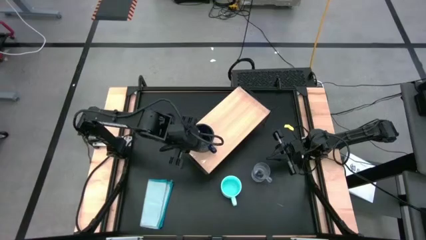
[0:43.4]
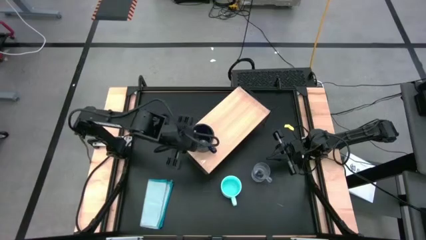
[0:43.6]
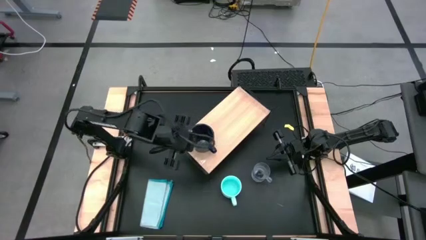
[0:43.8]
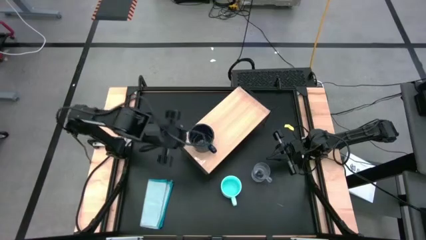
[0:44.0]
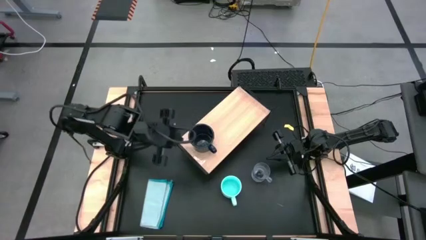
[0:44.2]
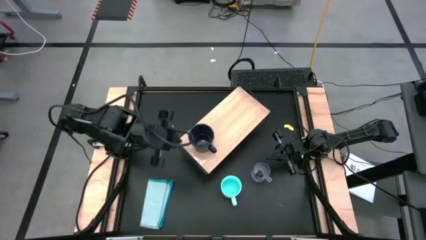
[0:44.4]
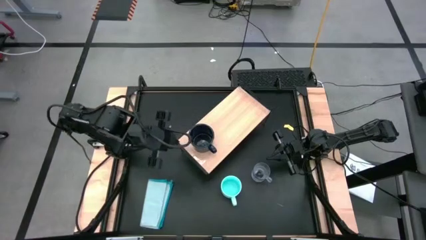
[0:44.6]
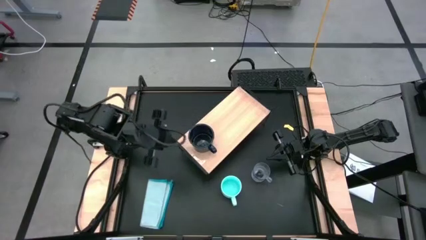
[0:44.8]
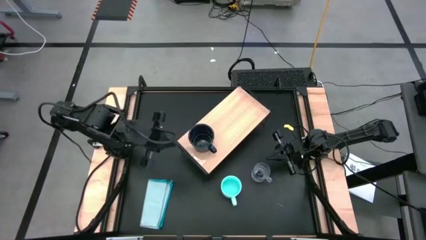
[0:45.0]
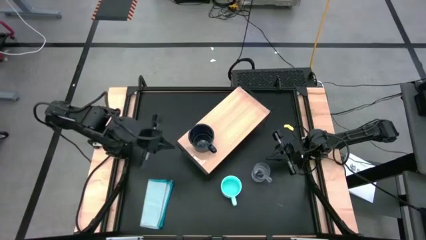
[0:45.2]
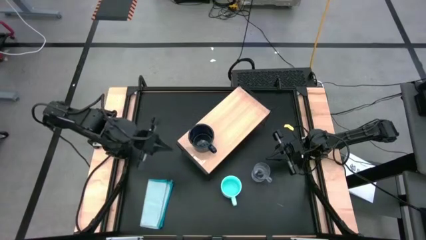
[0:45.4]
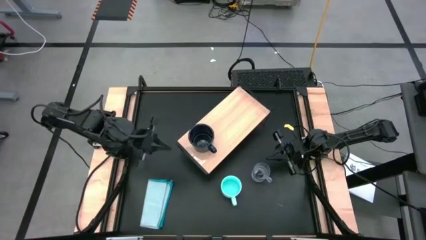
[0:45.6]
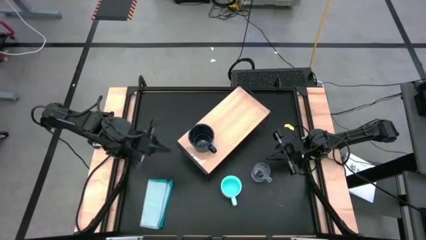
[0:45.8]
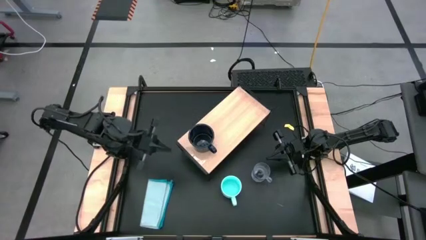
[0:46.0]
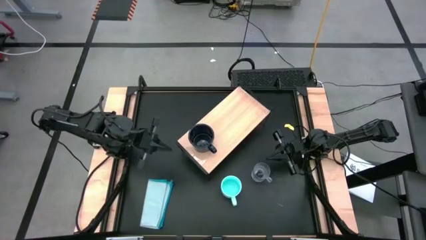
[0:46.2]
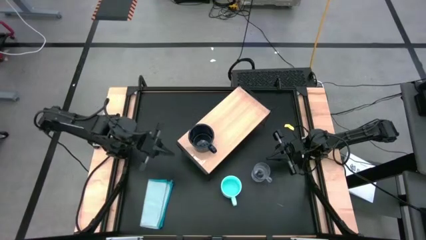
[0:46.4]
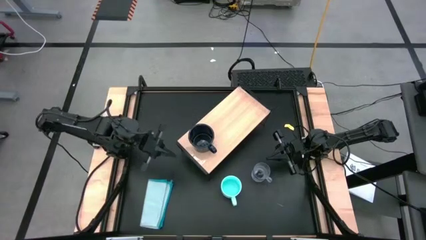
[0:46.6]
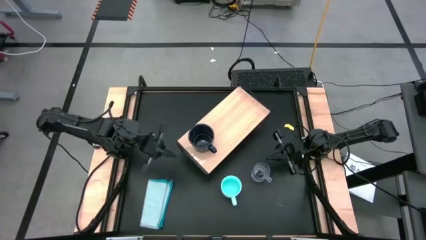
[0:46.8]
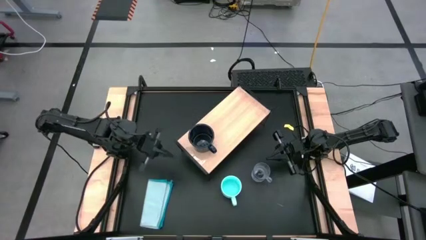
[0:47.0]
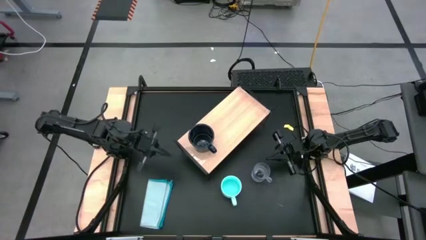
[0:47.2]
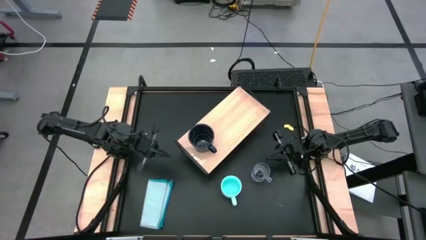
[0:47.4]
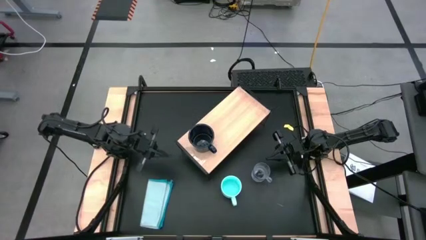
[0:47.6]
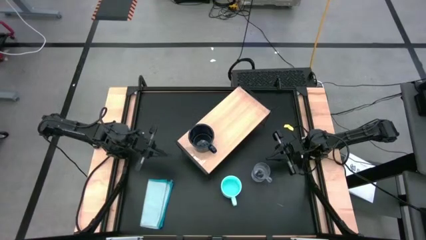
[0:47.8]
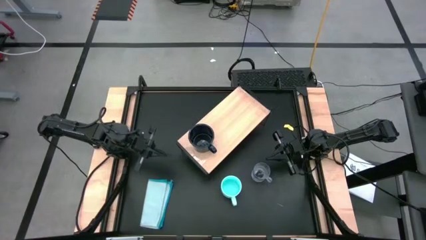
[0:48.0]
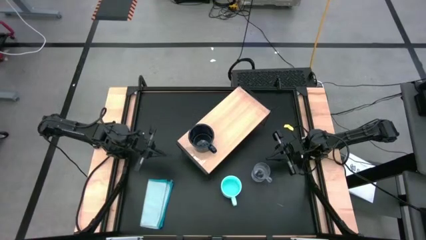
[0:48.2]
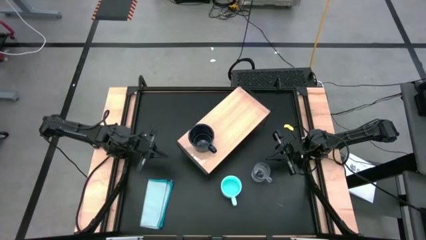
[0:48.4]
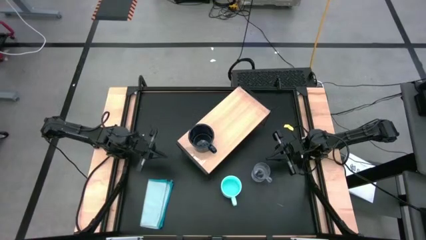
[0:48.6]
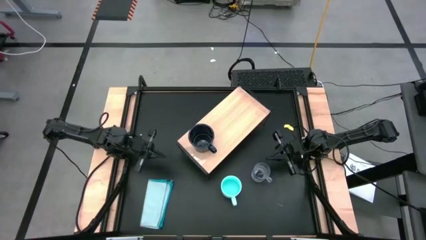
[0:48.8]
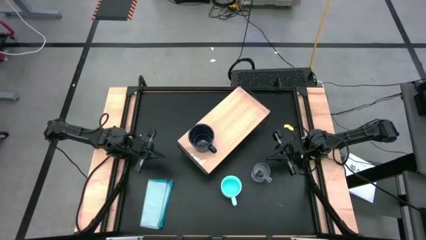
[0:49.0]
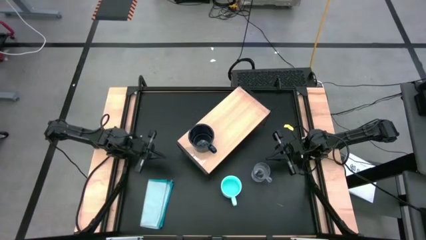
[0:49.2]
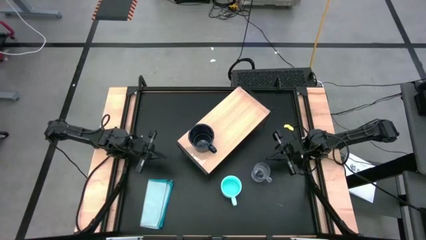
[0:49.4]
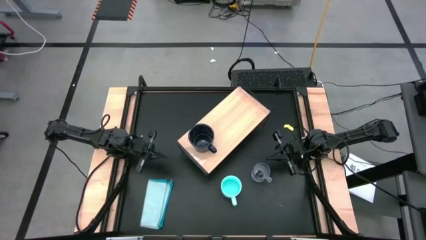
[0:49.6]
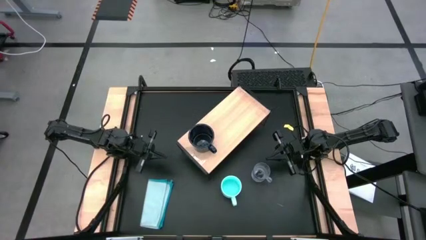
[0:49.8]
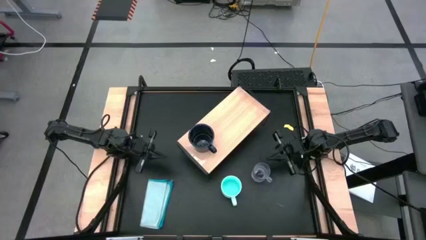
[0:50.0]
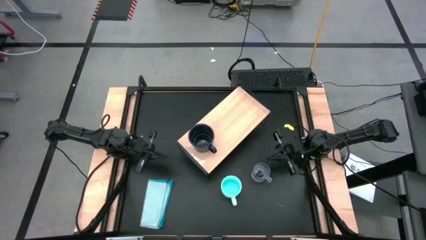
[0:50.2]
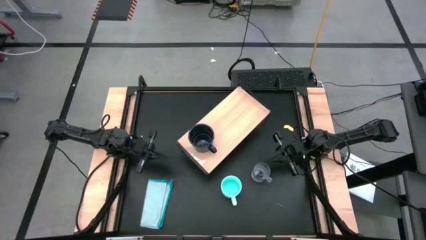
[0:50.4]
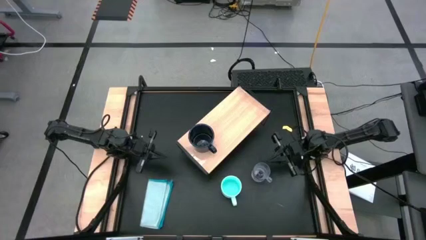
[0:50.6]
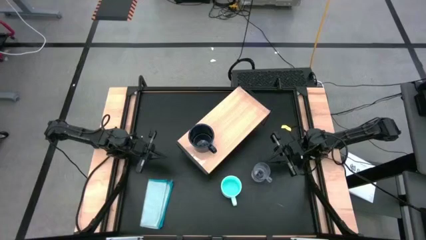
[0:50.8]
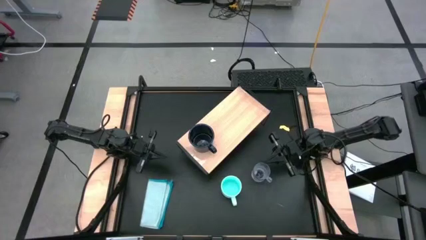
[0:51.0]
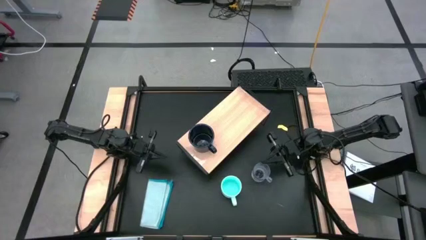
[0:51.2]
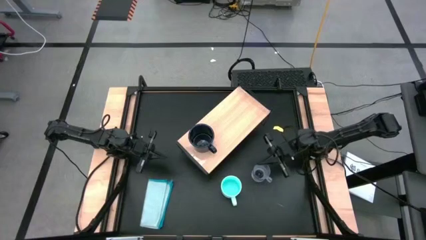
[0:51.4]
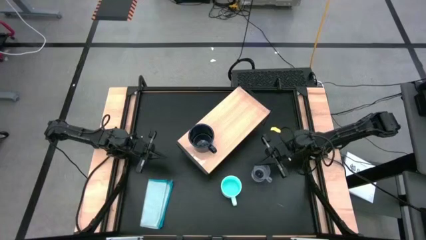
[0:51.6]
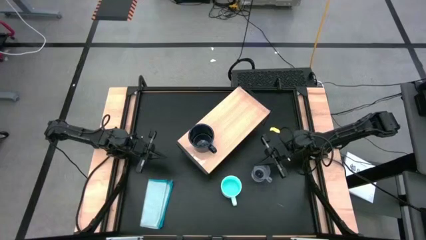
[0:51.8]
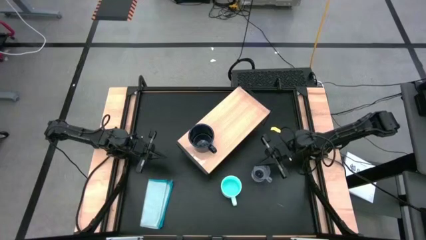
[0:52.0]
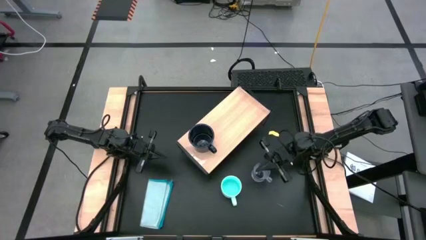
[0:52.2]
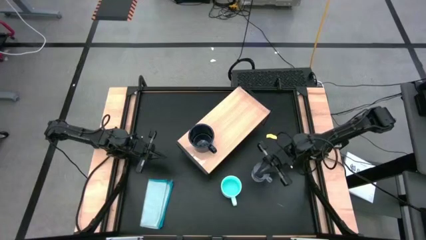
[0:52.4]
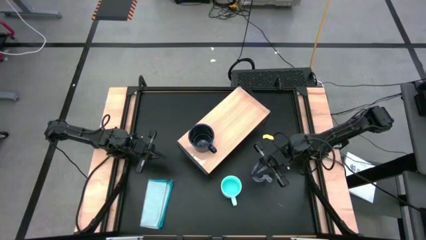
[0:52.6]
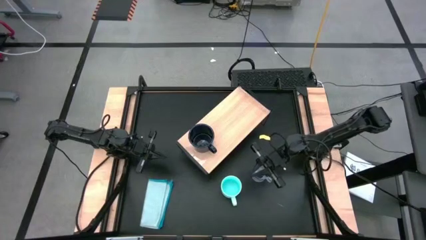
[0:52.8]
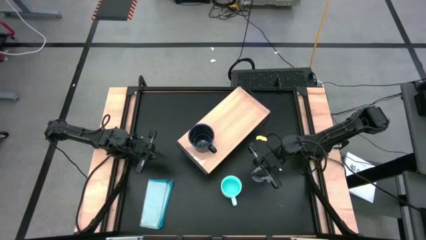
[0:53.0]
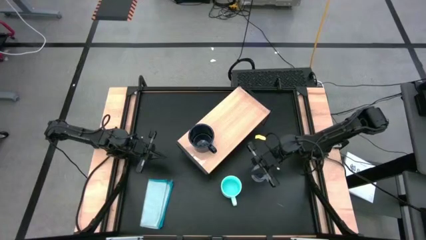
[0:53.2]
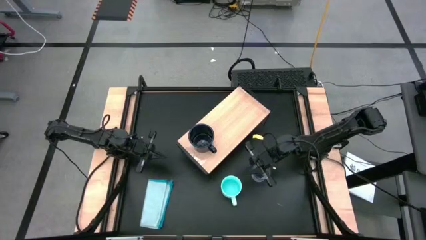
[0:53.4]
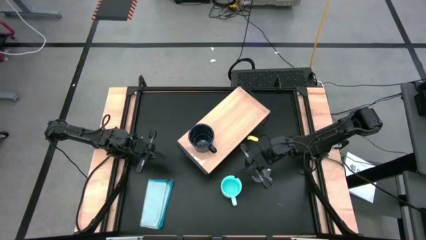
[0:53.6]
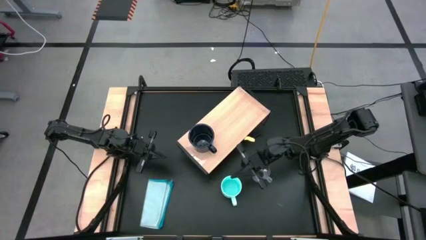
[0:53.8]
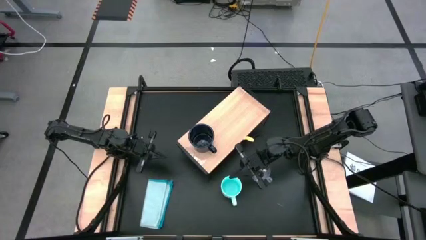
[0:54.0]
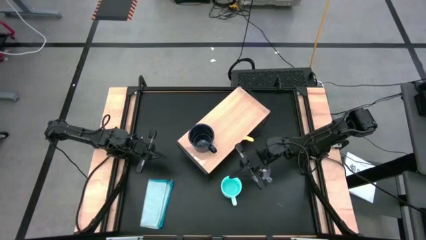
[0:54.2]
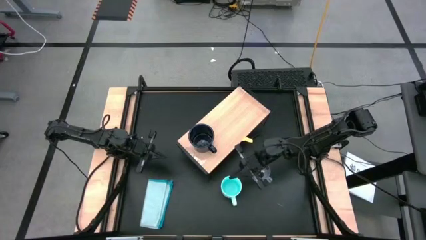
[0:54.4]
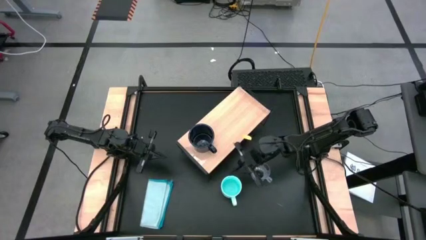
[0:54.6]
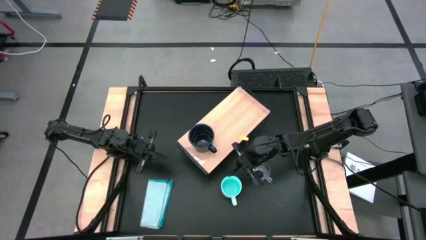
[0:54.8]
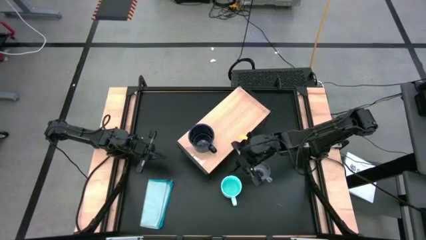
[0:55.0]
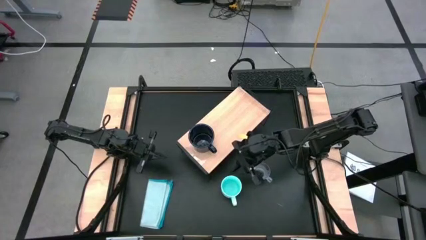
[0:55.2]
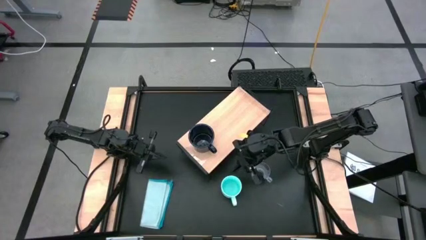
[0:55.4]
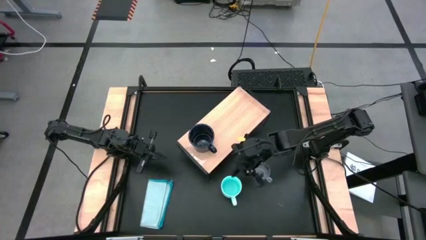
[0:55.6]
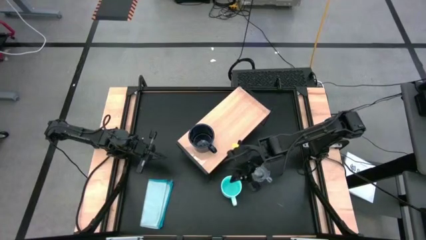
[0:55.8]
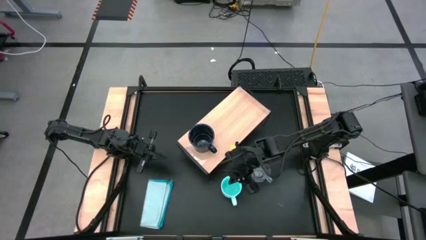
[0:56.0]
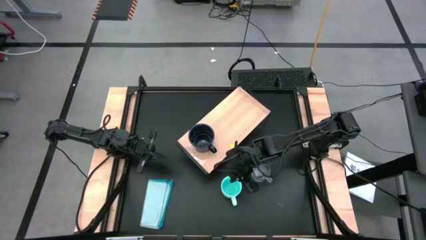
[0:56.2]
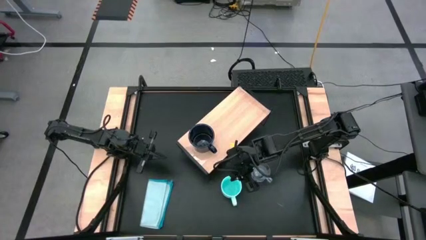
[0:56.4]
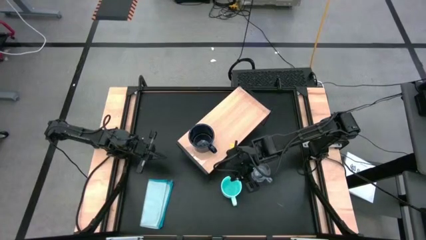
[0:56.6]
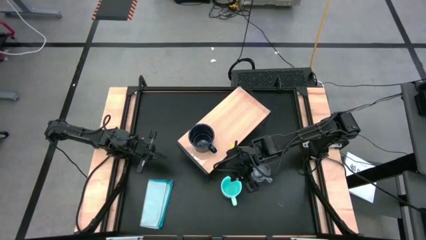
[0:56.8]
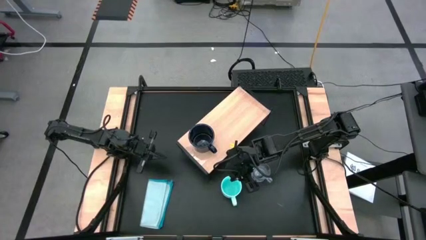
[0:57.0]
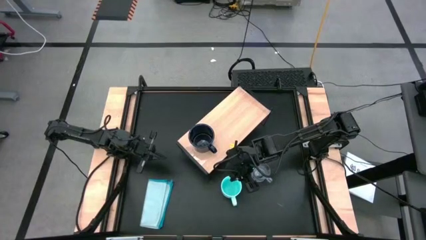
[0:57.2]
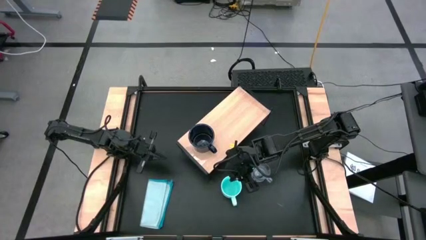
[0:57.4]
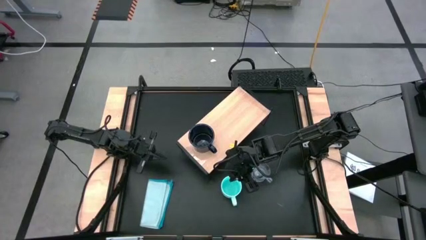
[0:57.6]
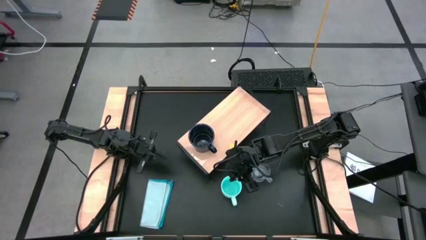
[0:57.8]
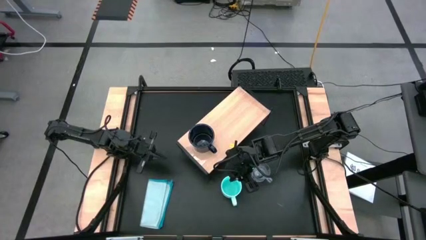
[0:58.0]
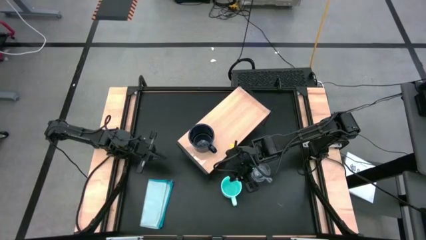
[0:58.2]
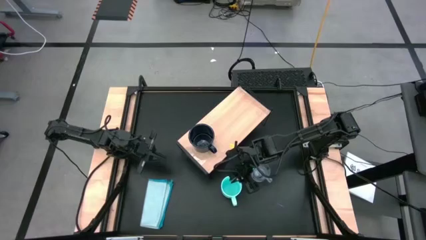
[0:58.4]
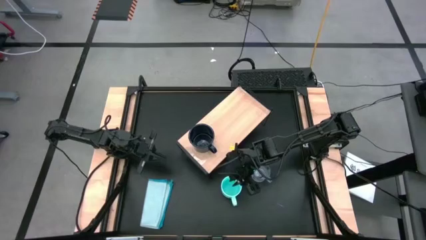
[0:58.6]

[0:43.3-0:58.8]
Task: Stack small to large cups/mugs on shelf
Put the blue cup on the shelf
